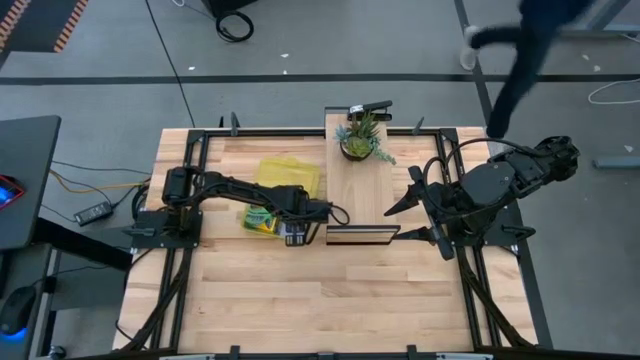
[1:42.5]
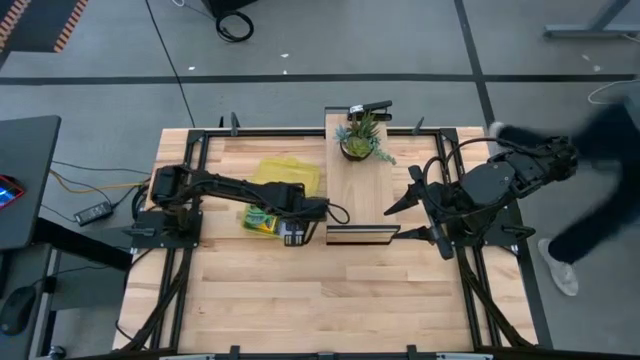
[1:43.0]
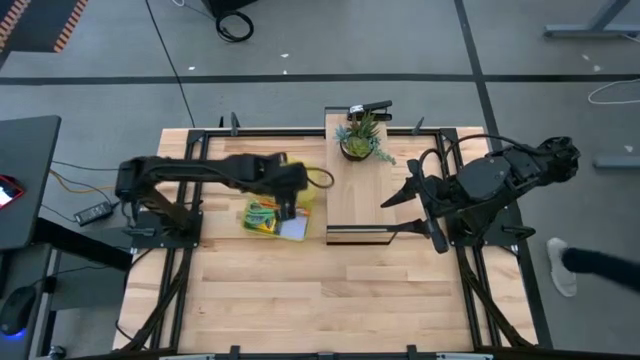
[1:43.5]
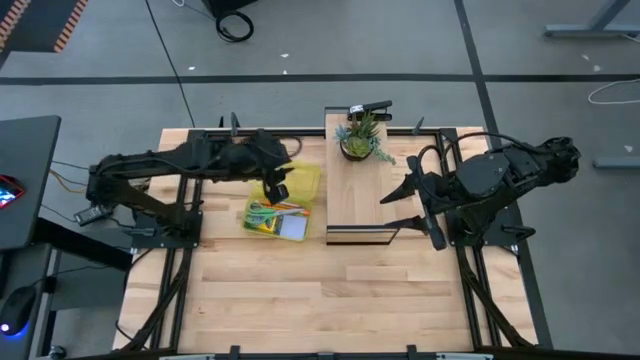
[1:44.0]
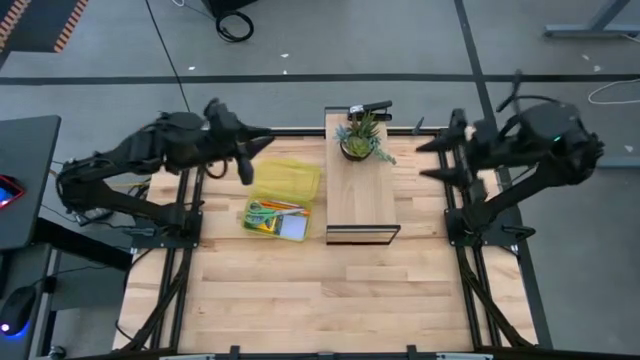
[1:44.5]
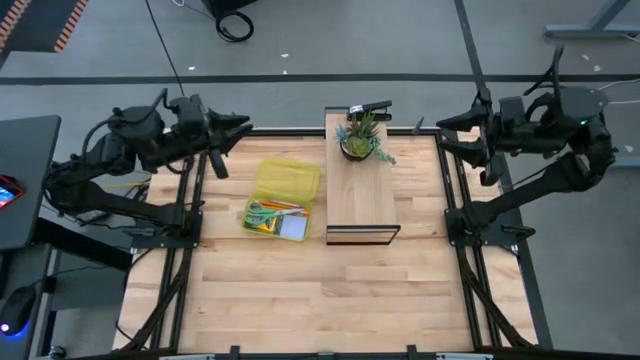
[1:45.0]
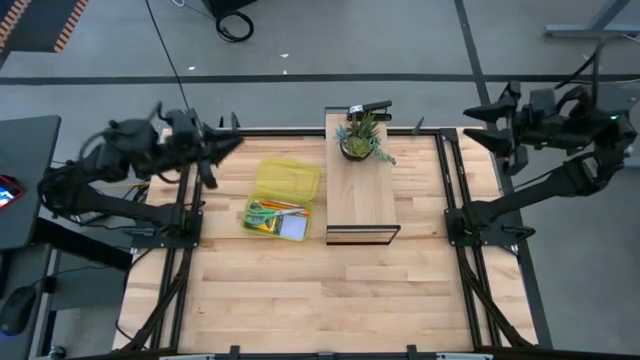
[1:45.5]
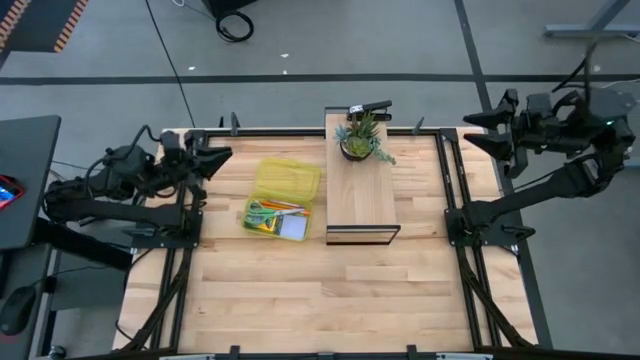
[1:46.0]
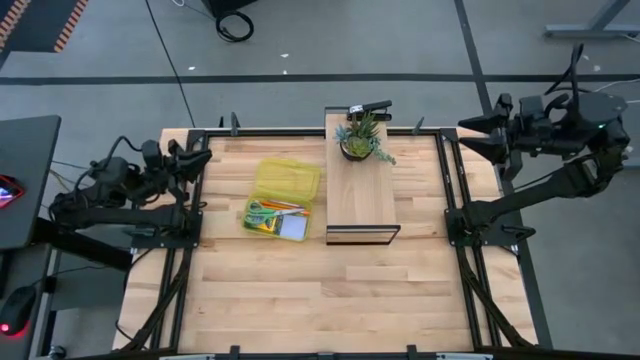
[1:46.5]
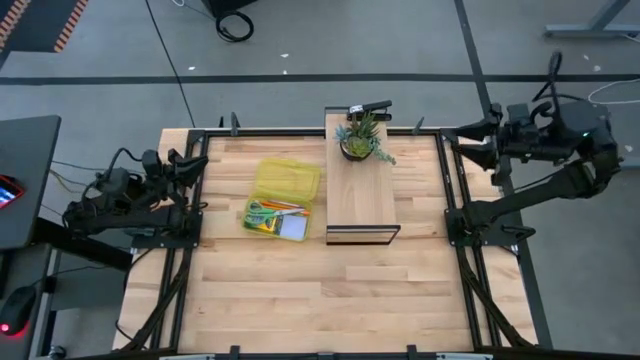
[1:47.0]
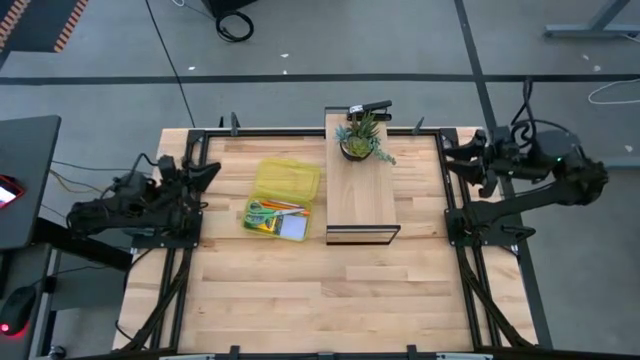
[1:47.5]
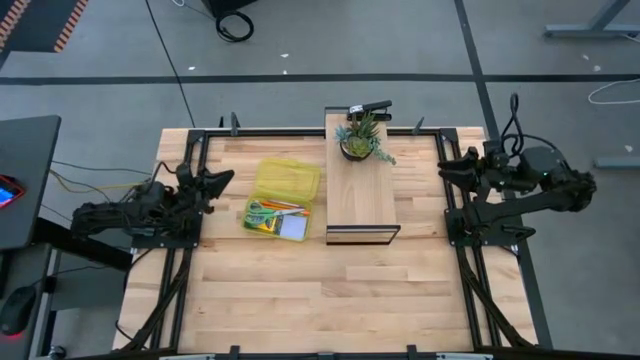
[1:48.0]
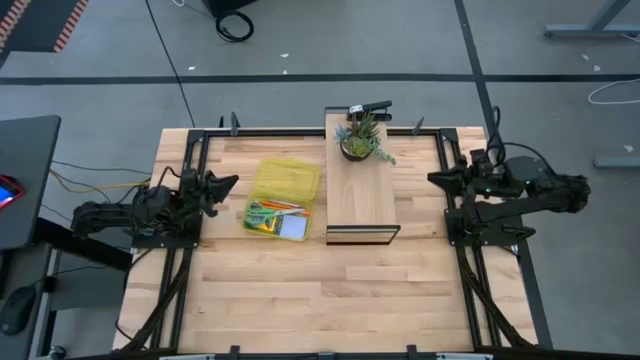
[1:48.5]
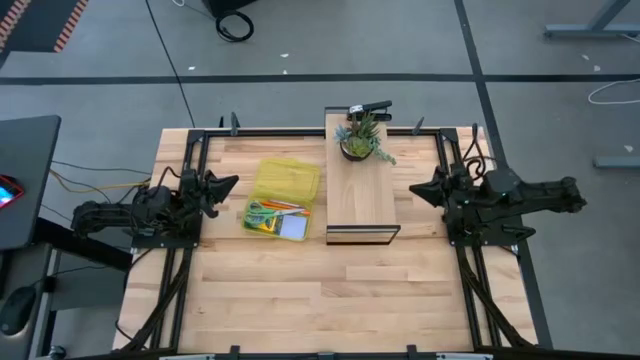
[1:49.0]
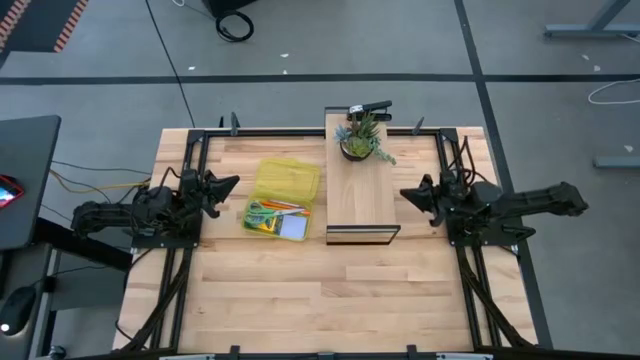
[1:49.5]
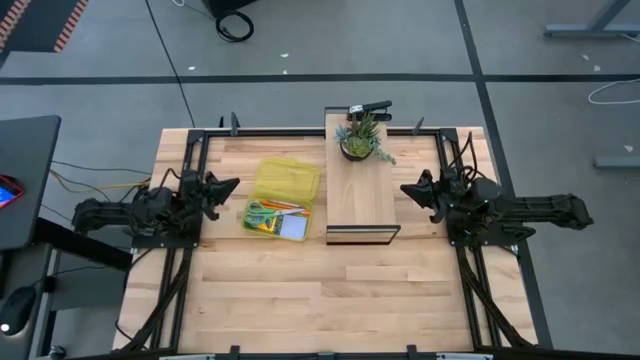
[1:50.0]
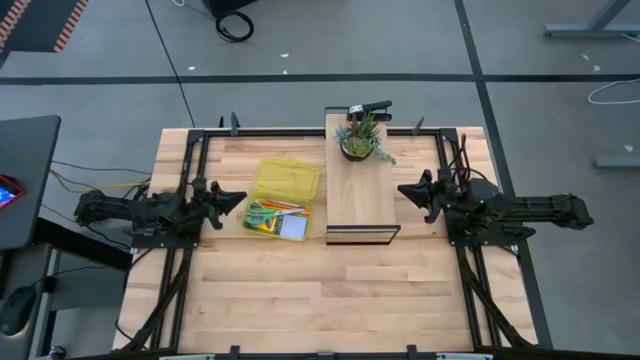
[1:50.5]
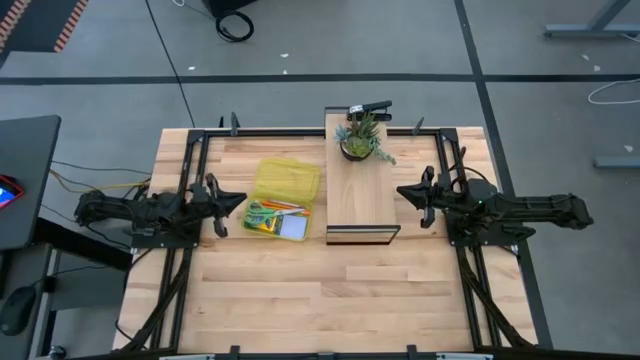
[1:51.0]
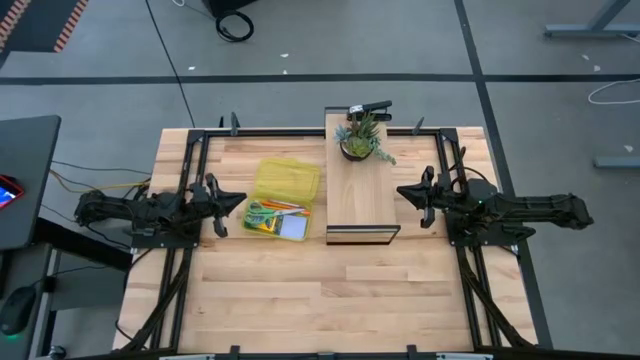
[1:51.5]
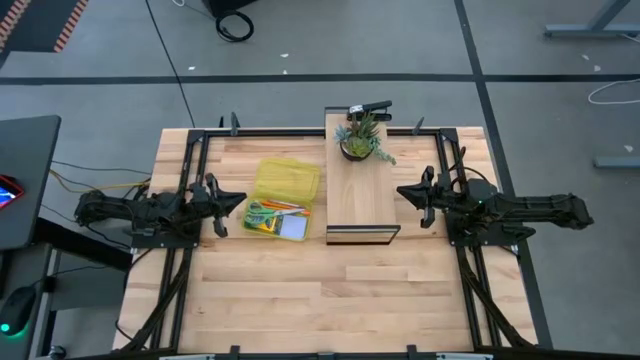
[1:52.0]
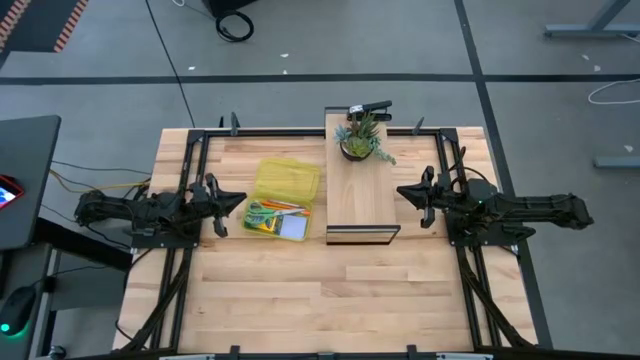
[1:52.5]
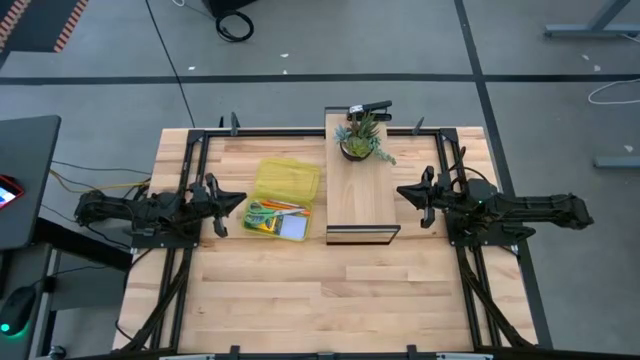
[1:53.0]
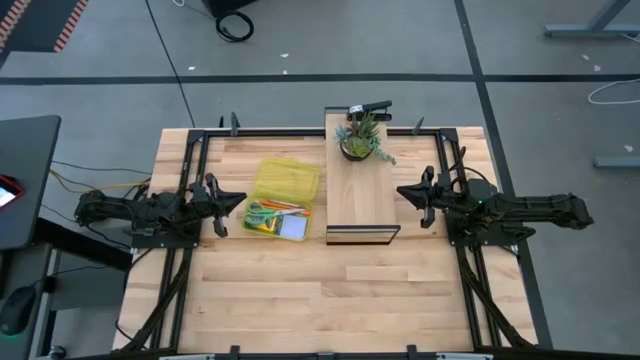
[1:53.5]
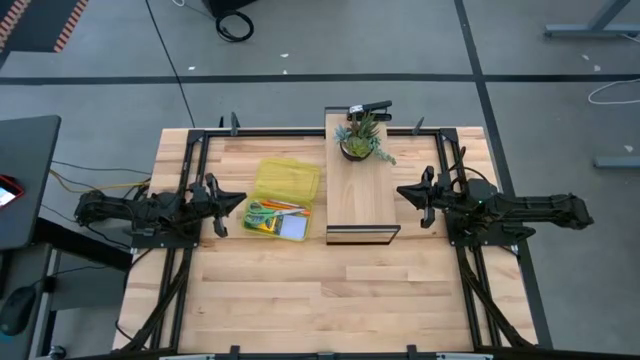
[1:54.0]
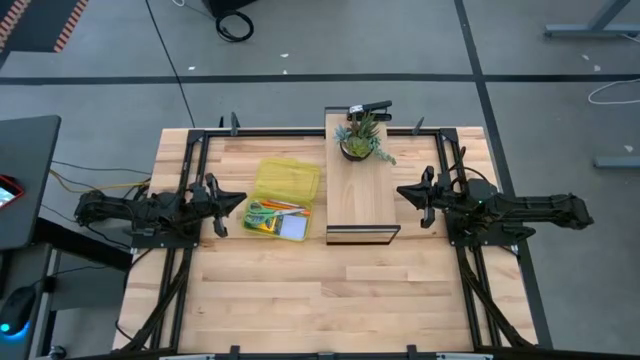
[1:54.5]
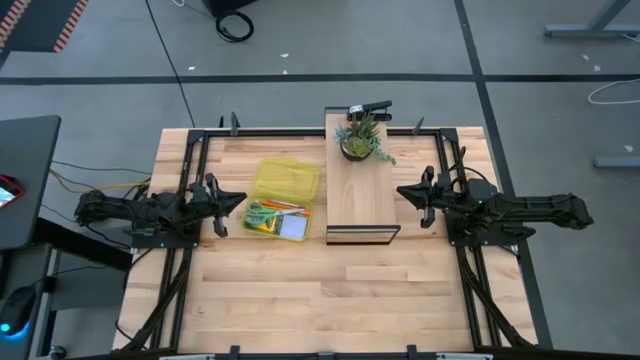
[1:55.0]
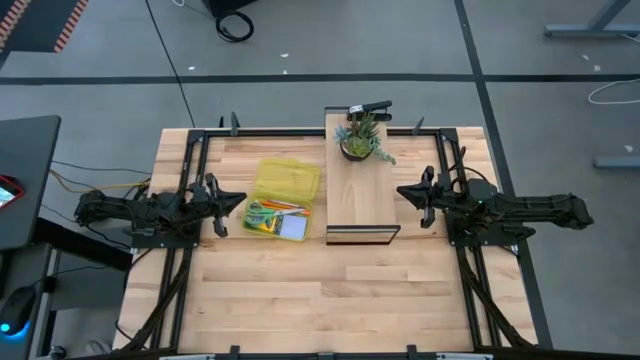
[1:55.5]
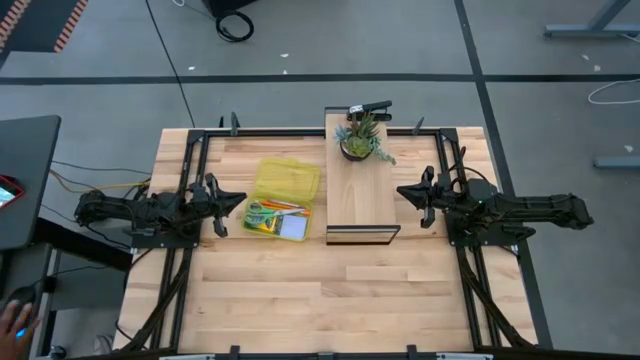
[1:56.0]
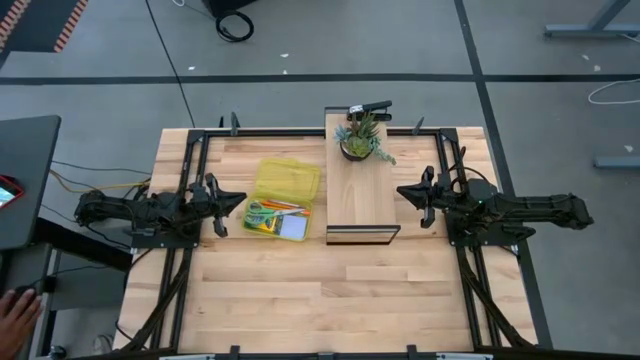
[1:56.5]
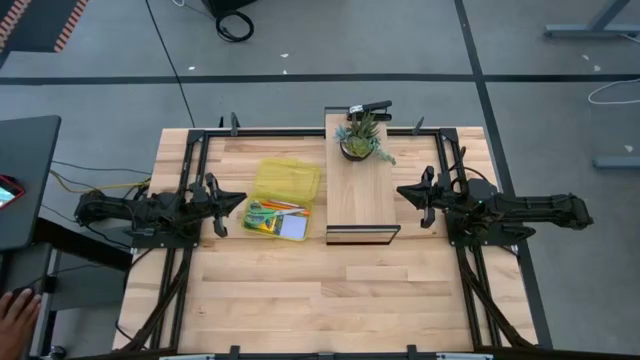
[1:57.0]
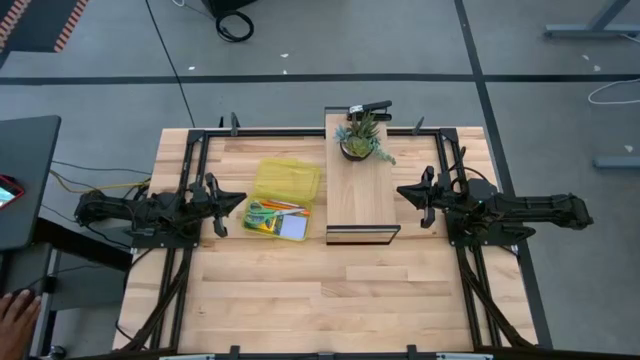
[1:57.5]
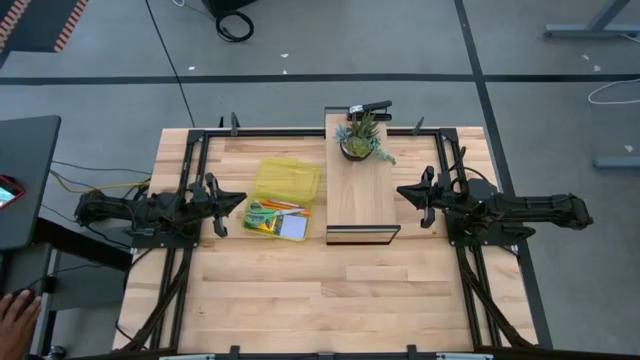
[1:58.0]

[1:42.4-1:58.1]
Task: Pack school essentials
Return to Home Position

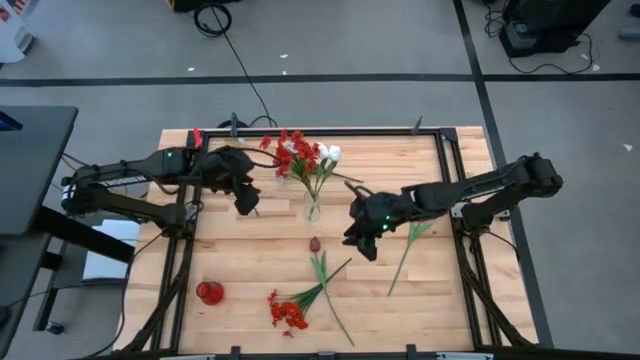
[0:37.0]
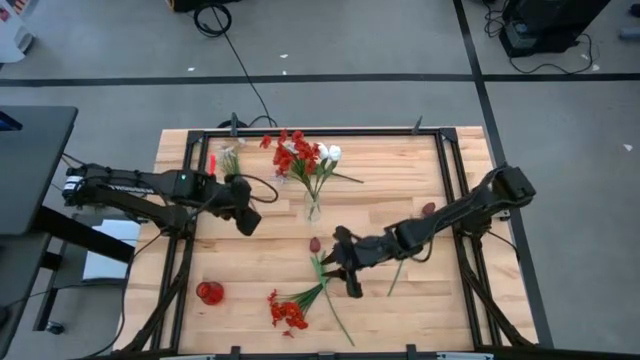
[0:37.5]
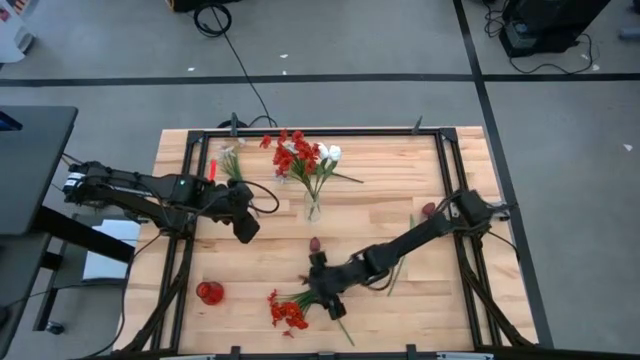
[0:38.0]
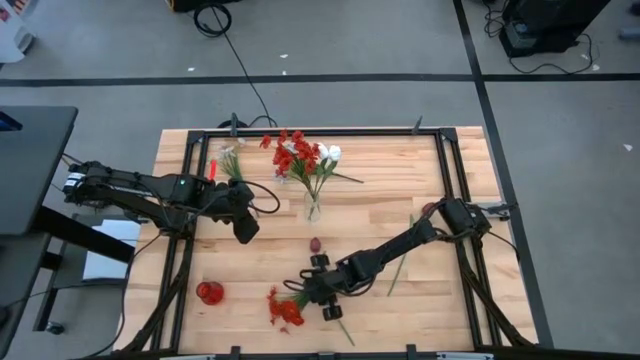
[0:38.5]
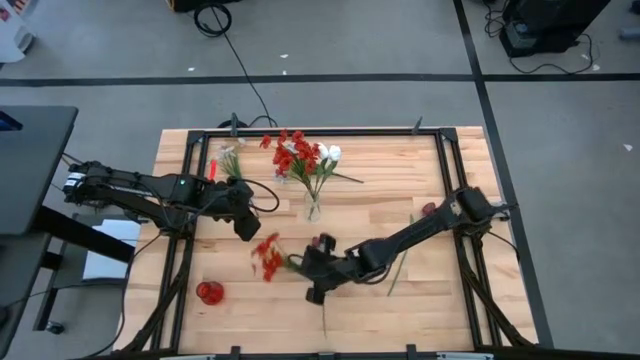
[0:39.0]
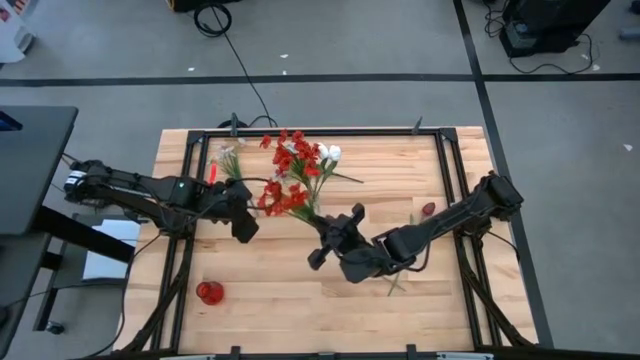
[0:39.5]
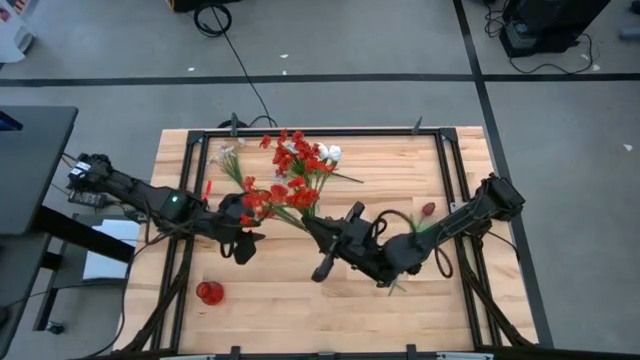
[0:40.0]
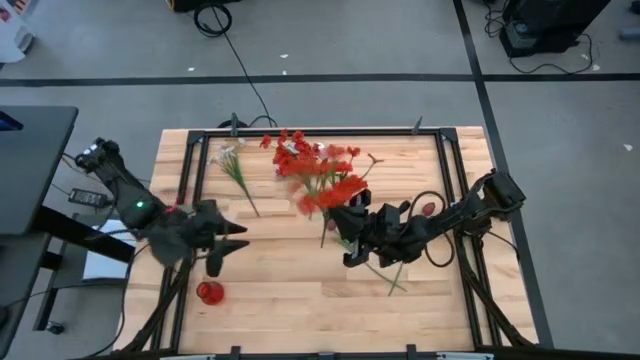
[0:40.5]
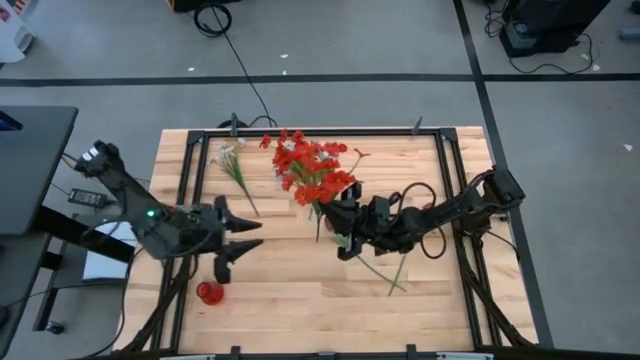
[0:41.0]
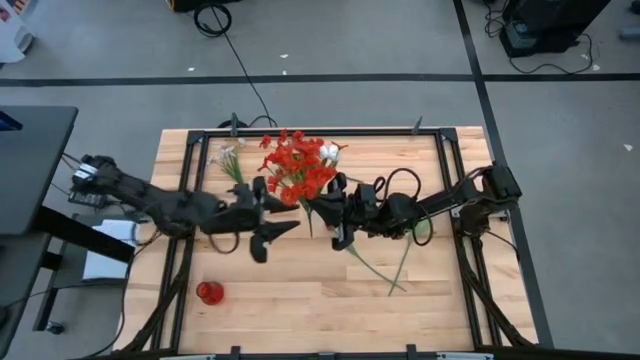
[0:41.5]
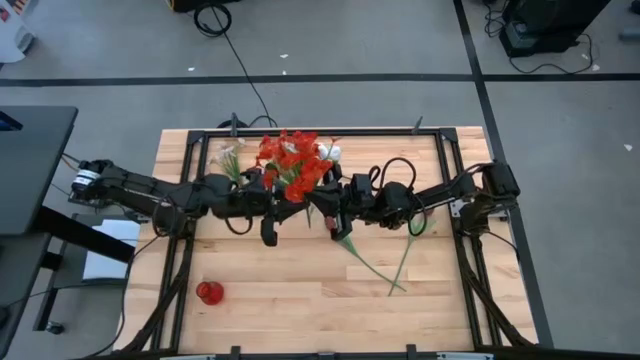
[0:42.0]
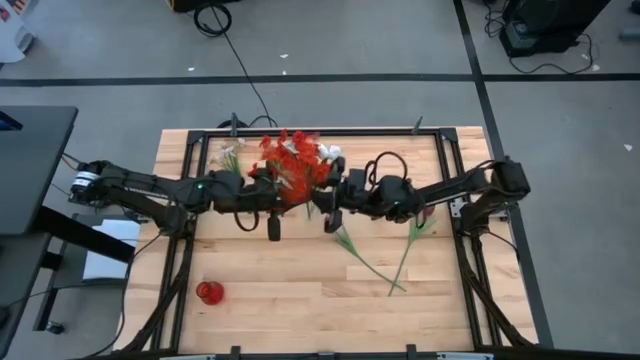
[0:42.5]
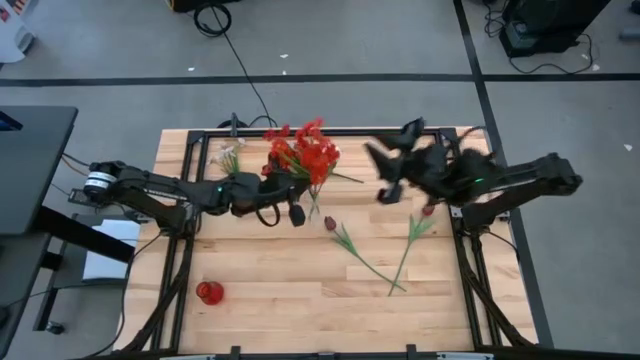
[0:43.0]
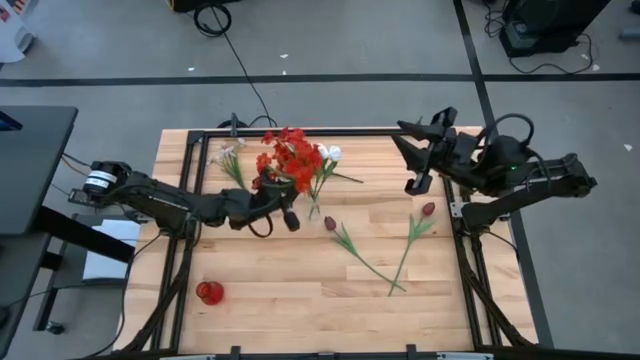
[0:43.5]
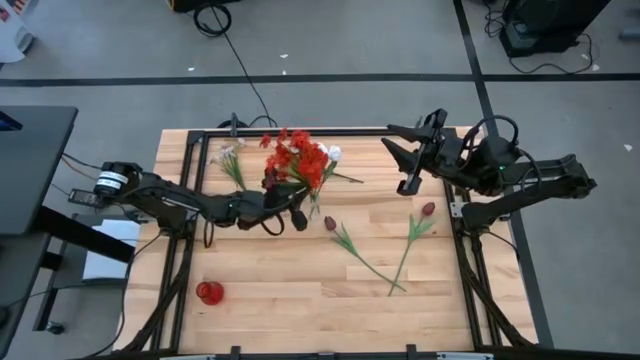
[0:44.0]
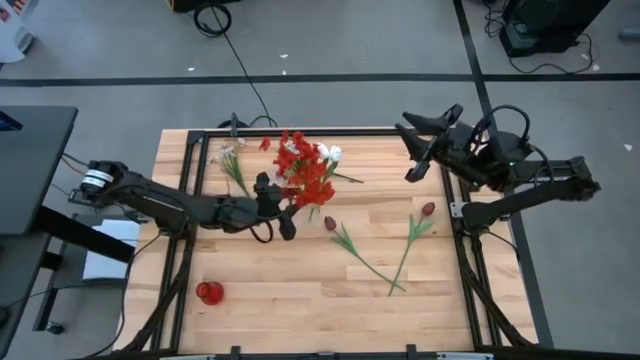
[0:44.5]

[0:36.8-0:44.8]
Task: Sort flowers into vase by color
Put the orange flowers into the transparent vase
